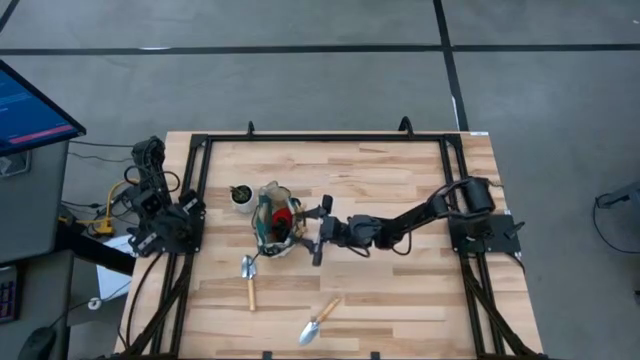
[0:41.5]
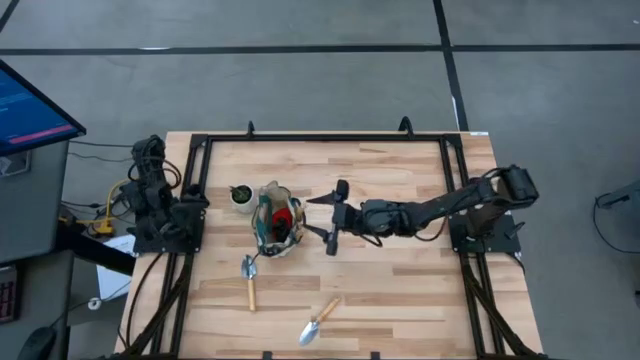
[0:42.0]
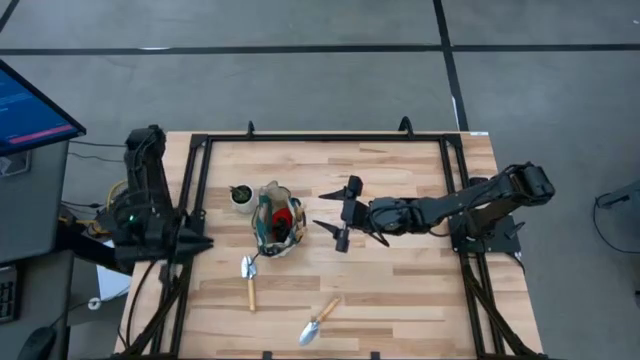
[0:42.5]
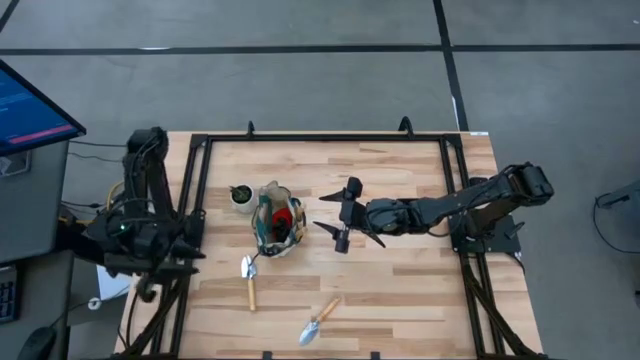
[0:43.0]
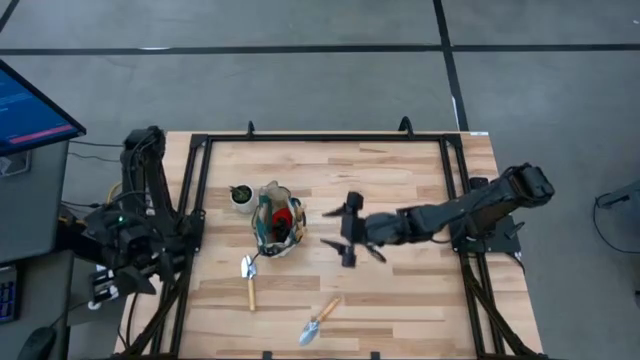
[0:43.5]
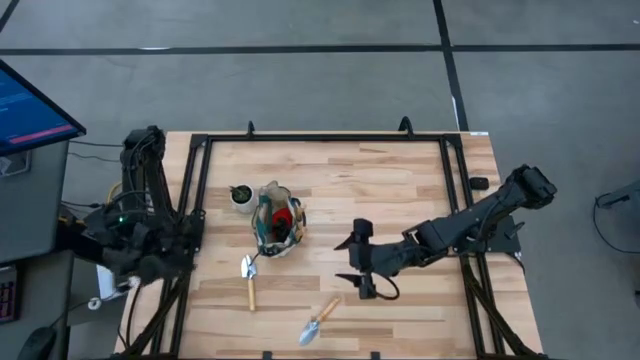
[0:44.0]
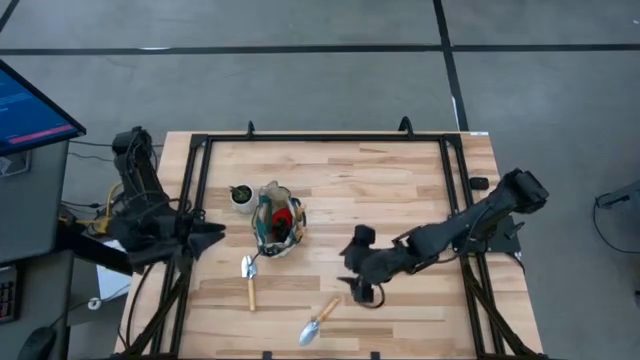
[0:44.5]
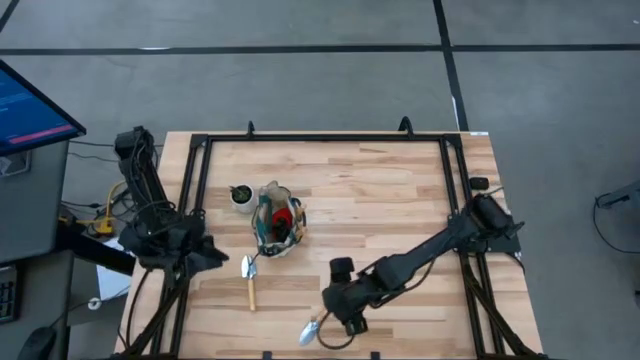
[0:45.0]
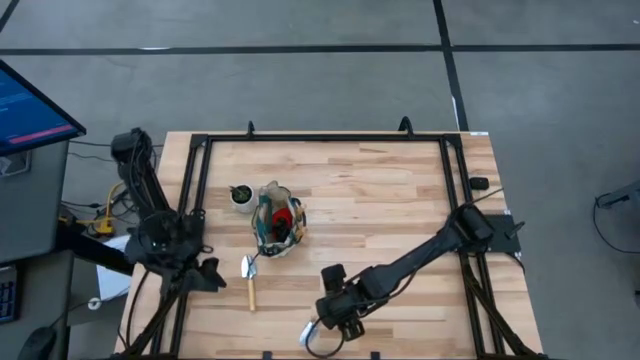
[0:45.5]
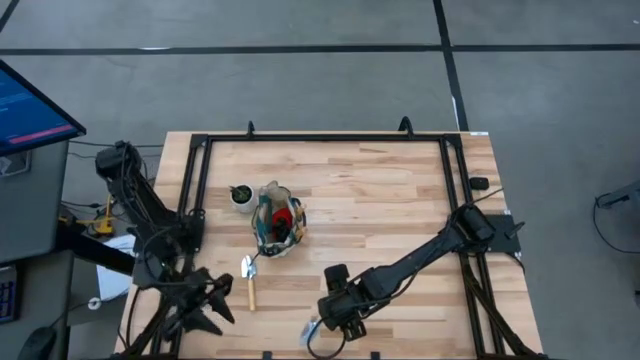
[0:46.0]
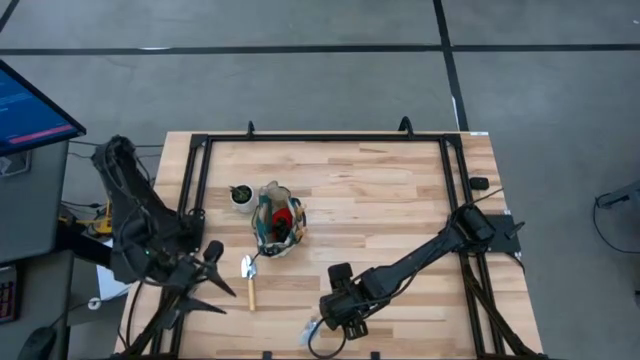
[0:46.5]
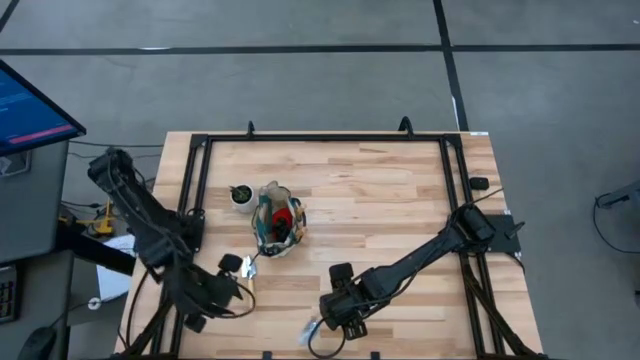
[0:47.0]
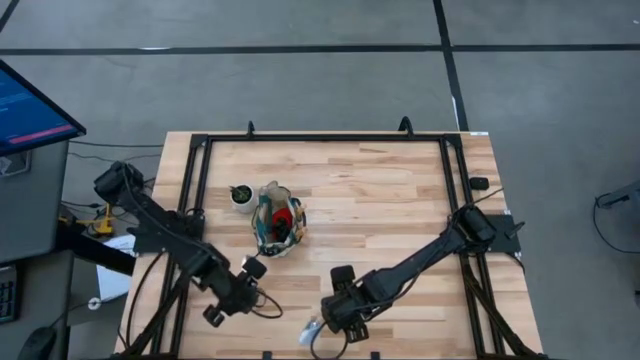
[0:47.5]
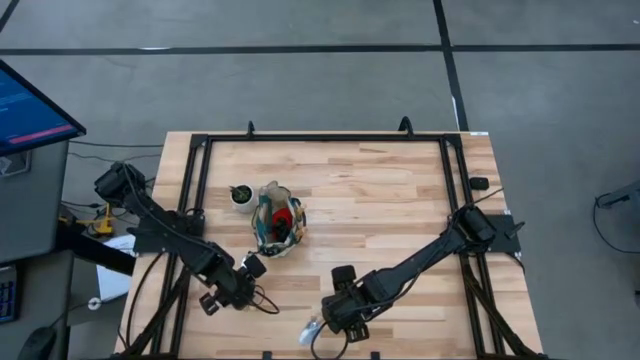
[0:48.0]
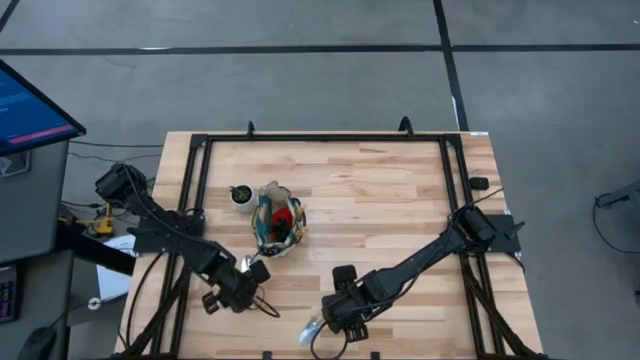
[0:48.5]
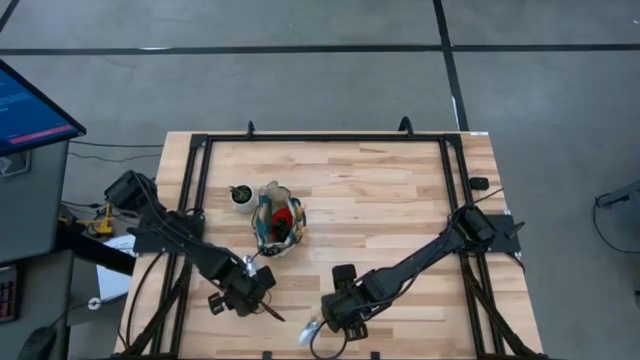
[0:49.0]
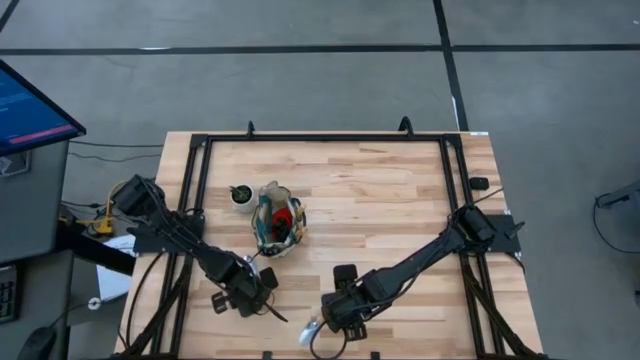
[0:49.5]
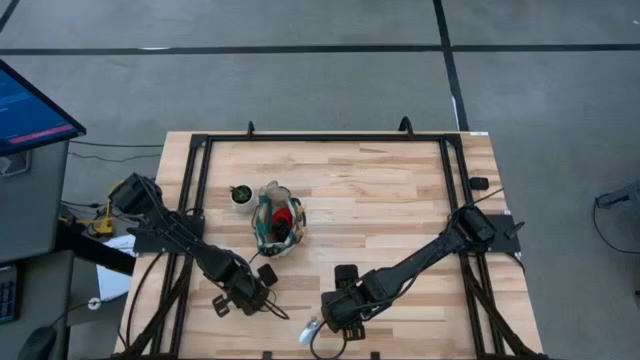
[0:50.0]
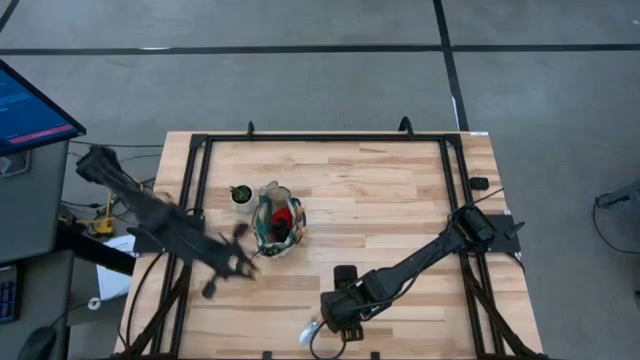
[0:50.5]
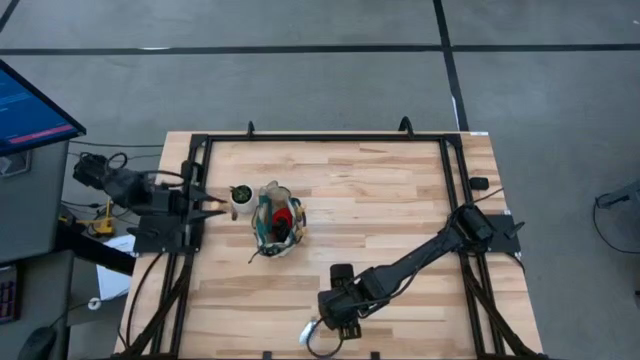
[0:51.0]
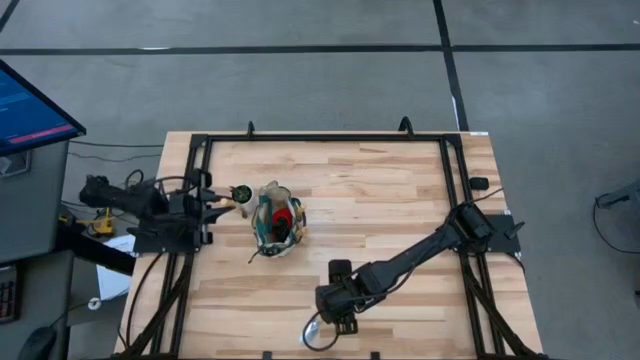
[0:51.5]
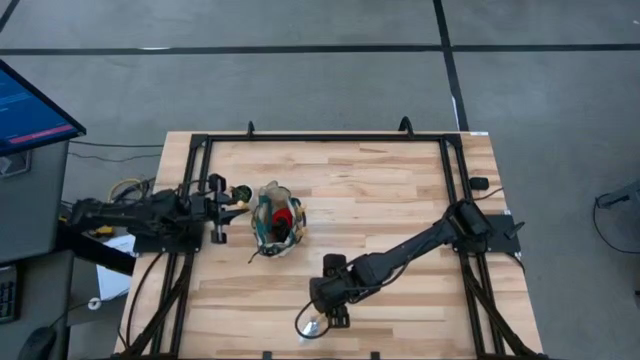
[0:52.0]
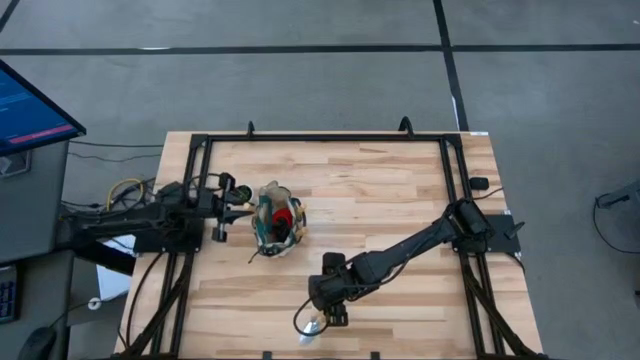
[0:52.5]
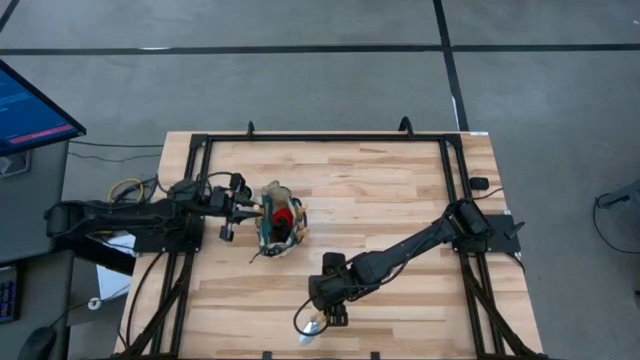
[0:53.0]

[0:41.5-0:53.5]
Task: Pick & Place Garden tools in Gardening bag
Put the trowel into the gardening bag

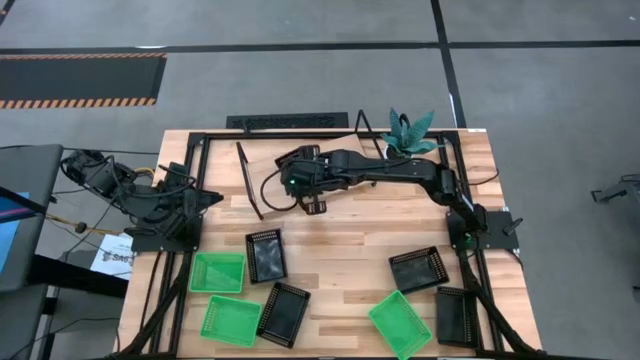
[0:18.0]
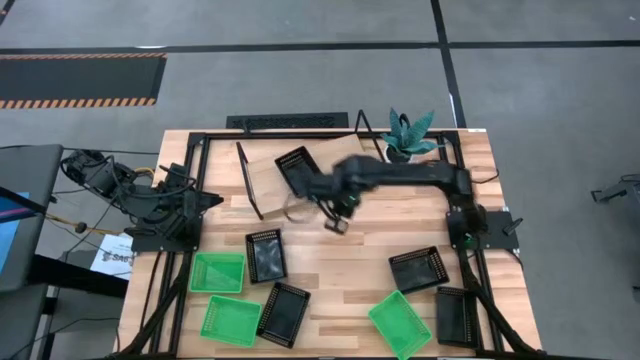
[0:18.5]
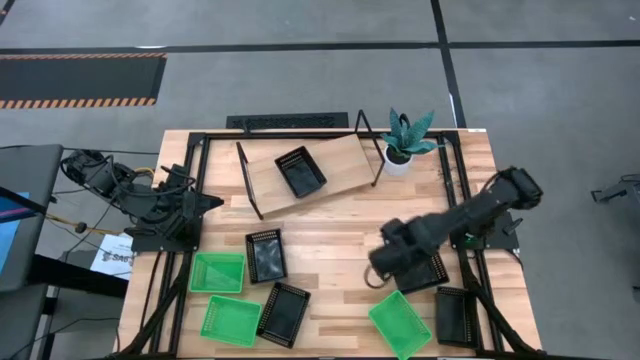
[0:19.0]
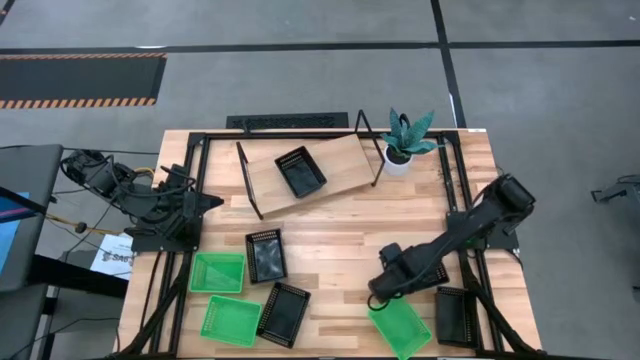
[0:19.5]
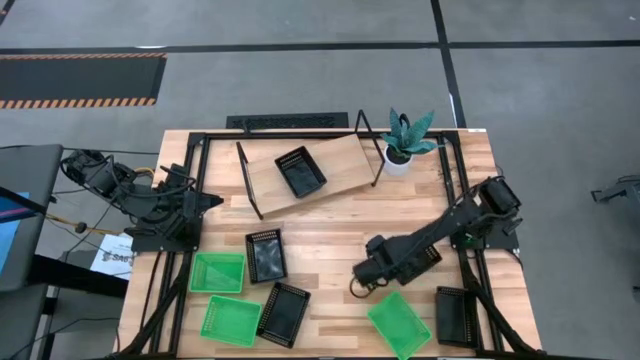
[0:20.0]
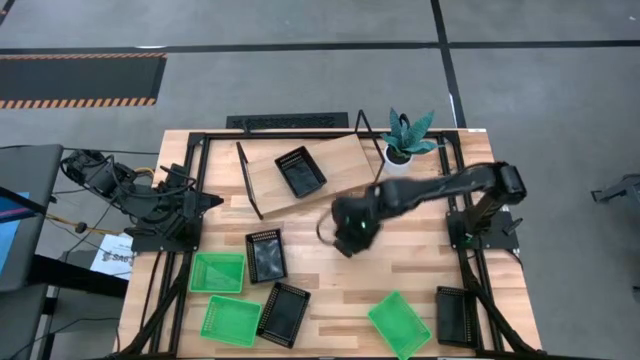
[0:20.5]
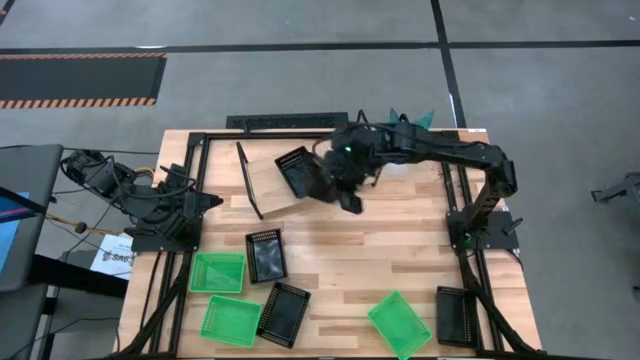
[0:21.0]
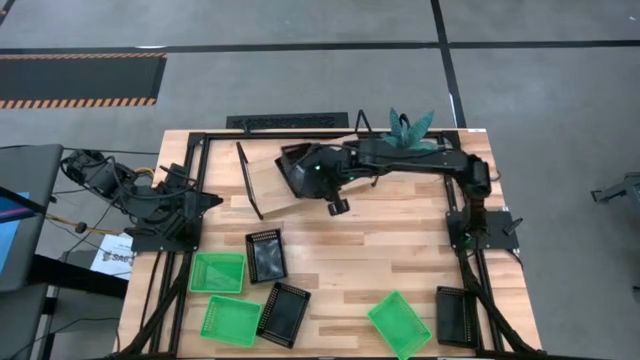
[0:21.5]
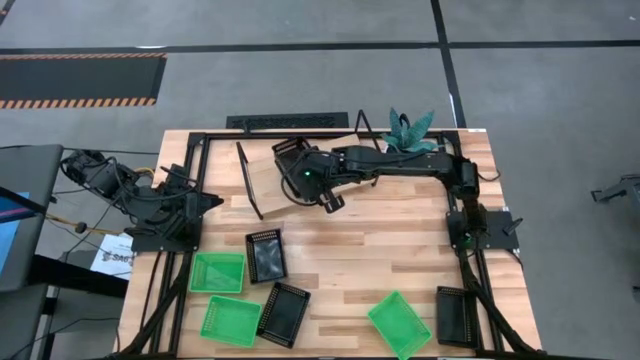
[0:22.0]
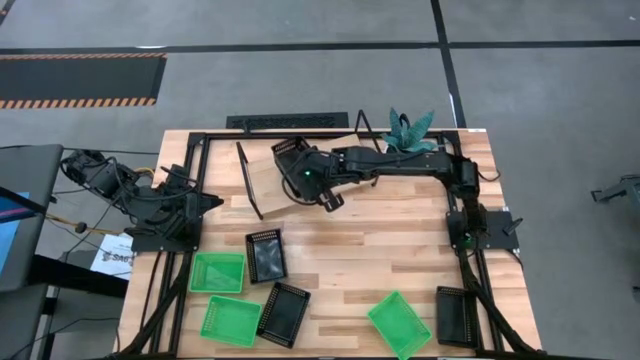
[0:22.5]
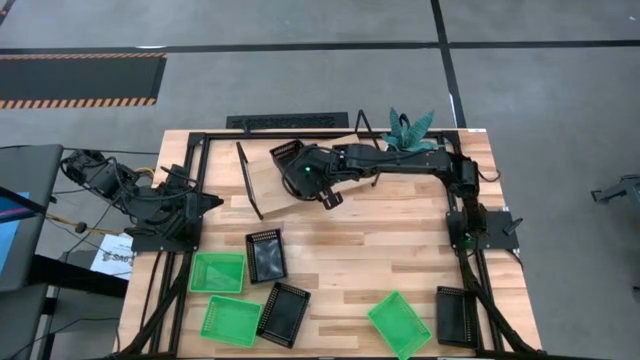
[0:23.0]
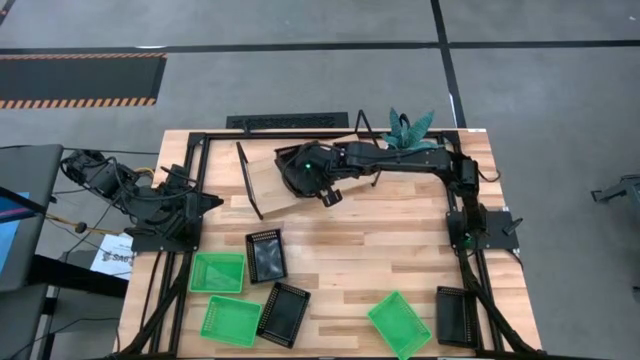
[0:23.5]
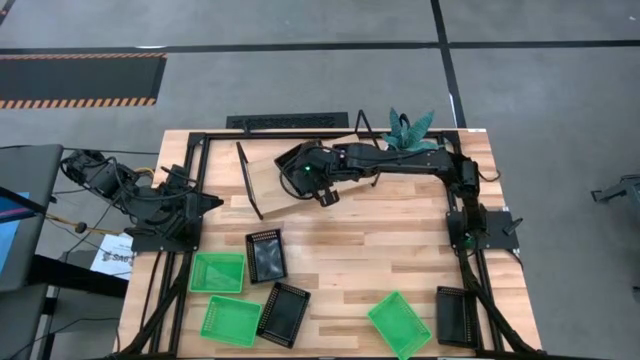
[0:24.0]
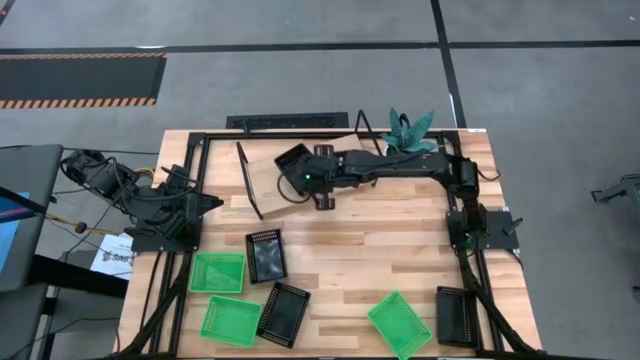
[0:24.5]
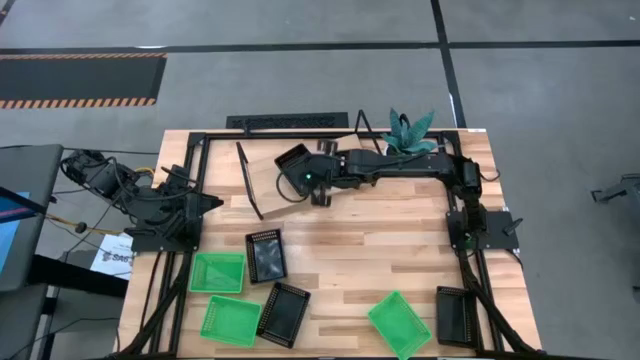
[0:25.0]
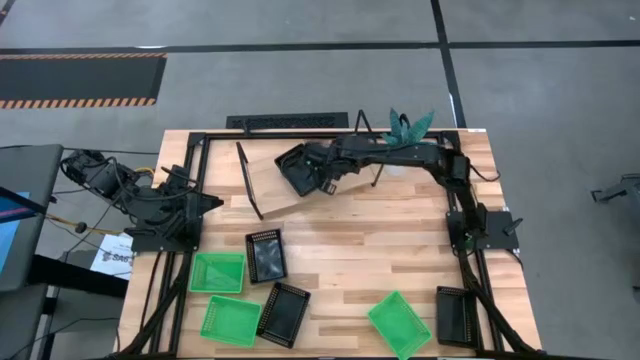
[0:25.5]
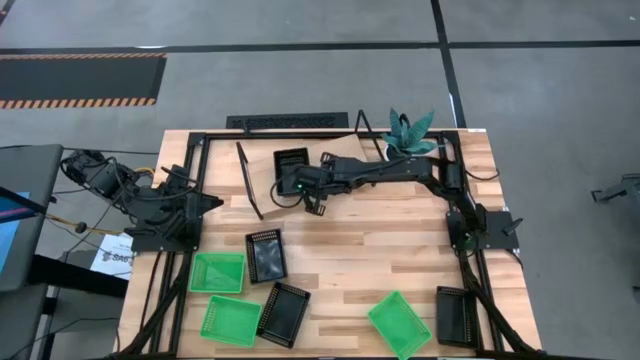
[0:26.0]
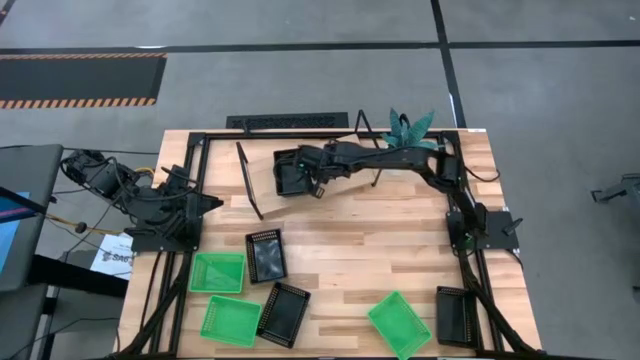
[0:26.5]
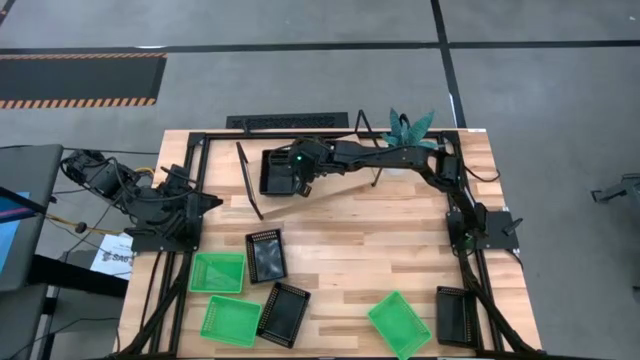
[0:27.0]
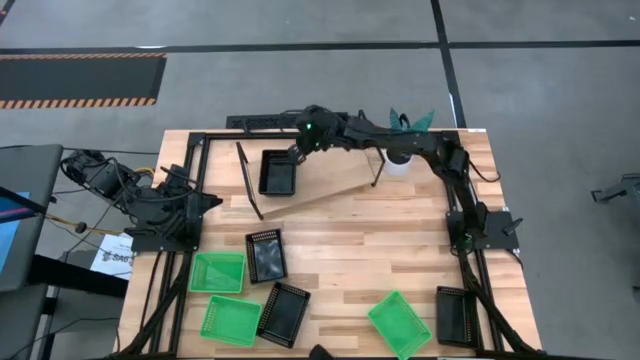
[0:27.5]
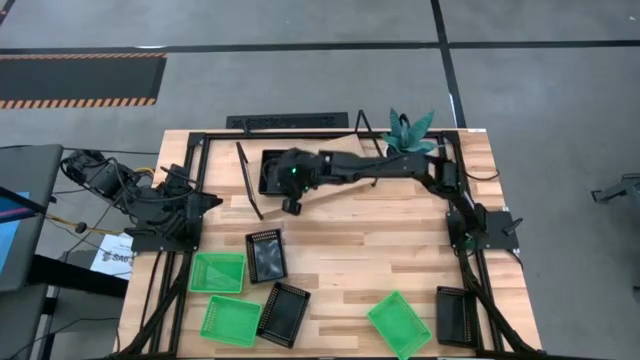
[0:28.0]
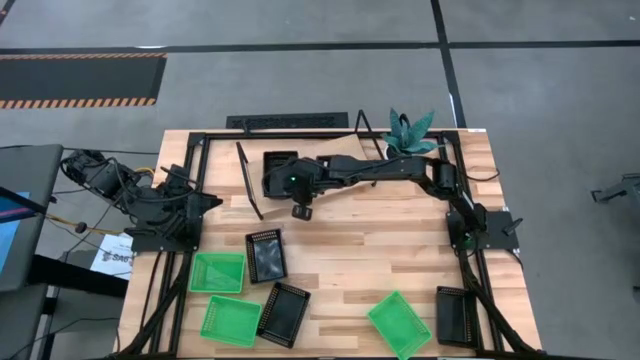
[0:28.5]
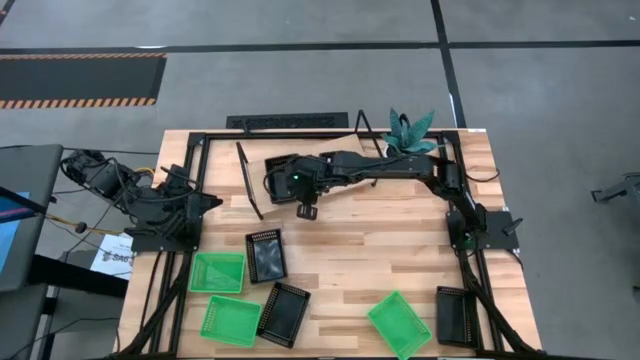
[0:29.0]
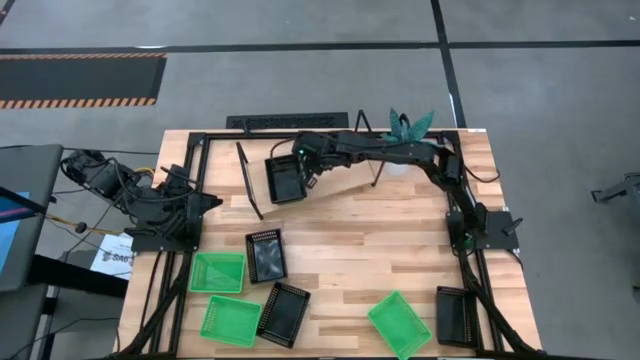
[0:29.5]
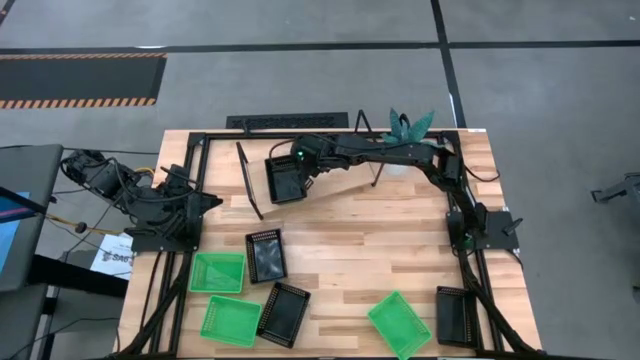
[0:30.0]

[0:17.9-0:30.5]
Task: Stack baskets on shelf by color
Stack the black basket on the black basket on the shelf
